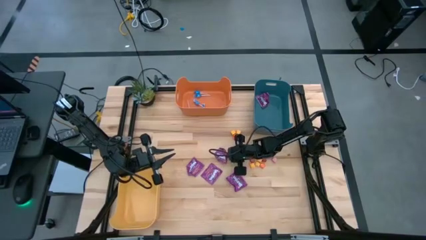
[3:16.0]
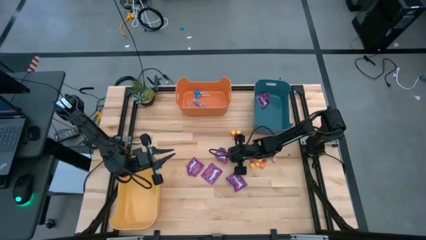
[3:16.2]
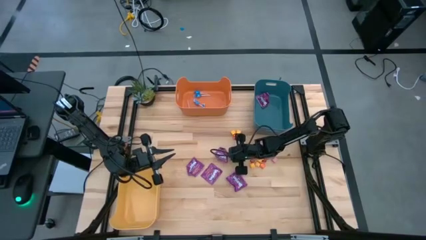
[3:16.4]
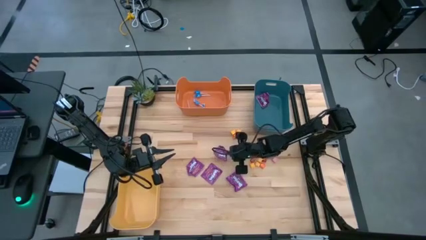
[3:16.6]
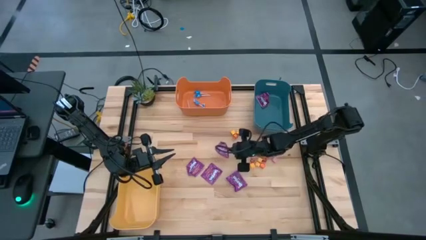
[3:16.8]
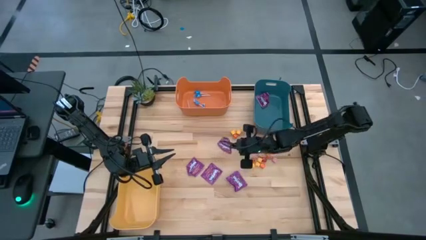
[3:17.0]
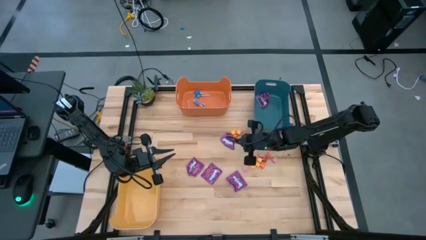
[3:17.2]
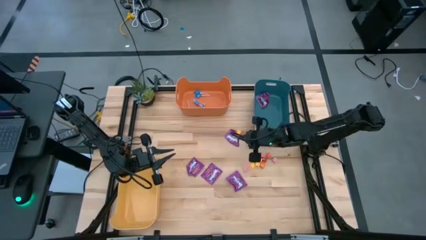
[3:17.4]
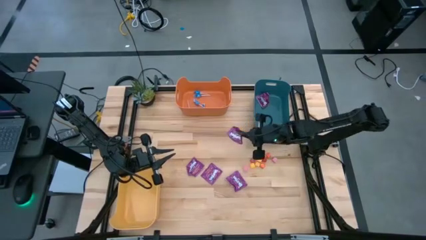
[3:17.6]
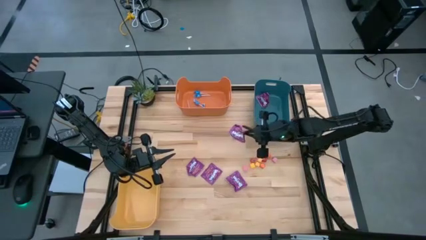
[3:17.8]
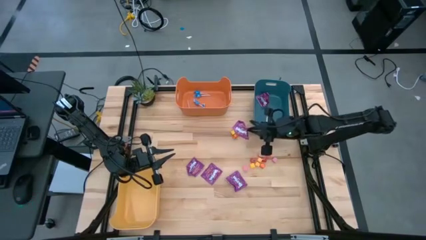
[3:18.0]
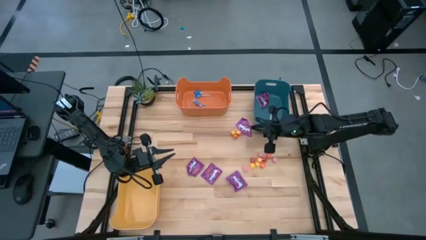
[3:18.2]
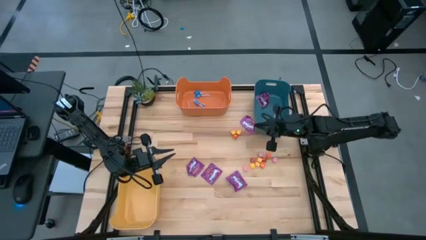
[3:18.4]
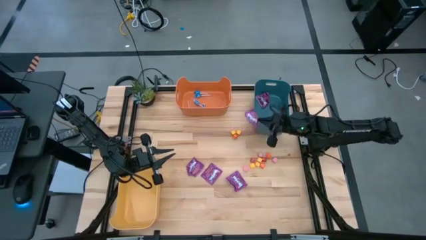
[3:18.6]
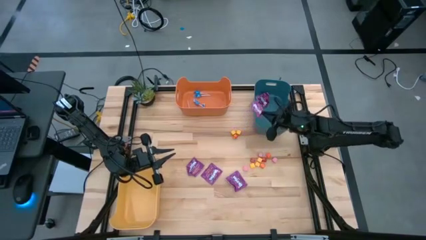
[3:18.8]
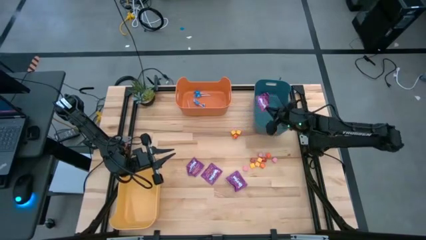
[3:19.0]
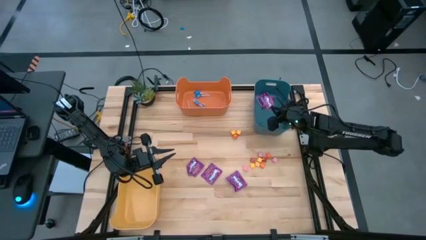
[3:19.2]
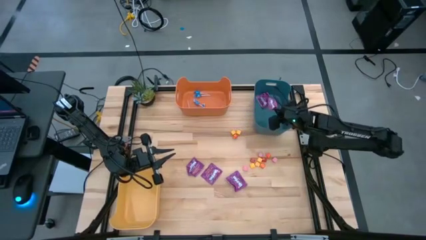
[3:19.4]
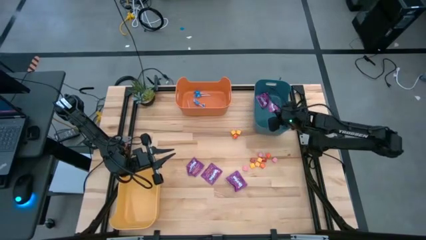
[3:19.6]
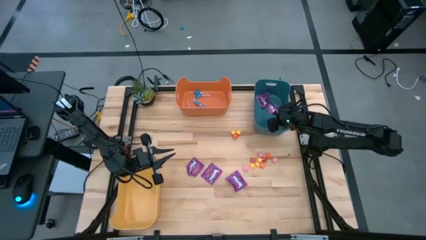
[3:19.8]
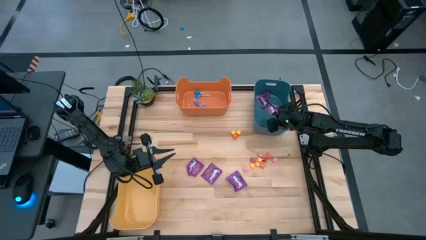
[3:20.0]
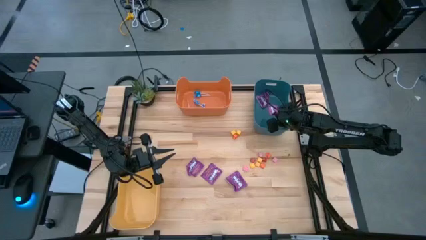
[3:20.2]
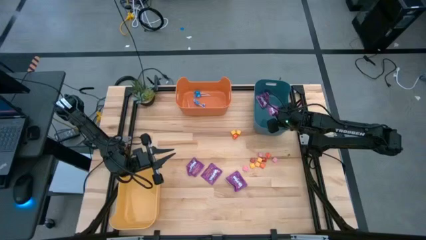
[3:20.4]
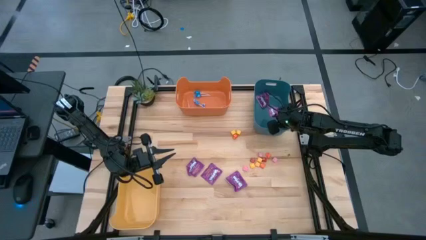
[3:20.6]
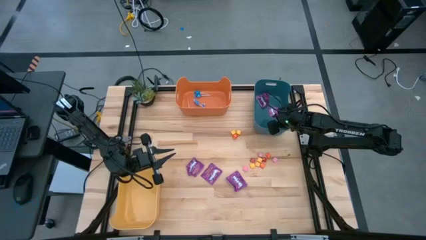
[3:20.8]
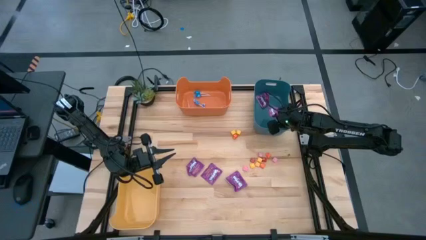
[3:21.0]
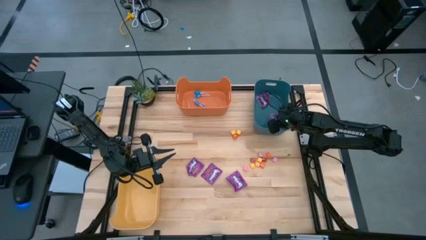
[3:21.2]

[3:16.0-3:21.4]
Task: Sort candy
Put the top purple candy into the blue bin

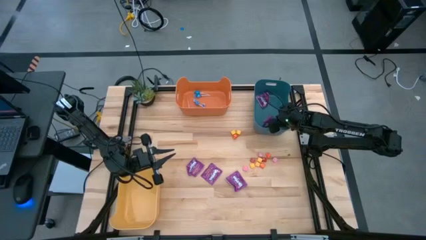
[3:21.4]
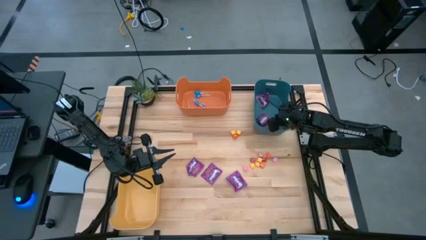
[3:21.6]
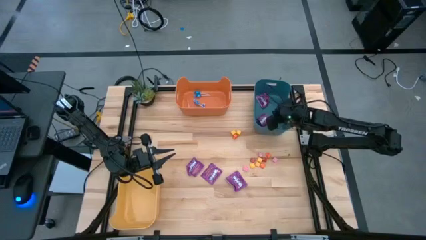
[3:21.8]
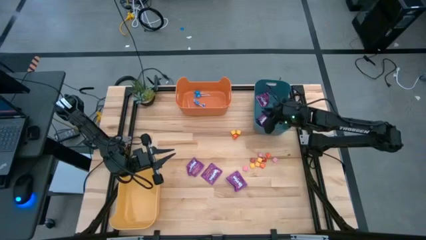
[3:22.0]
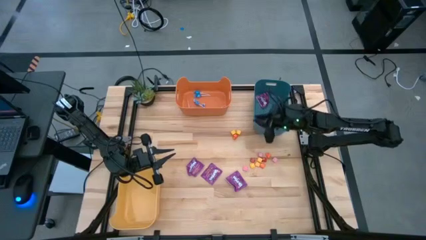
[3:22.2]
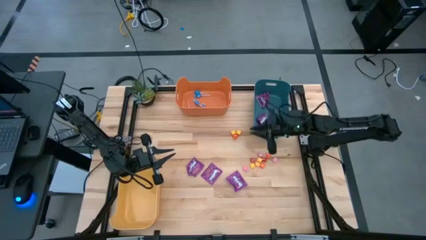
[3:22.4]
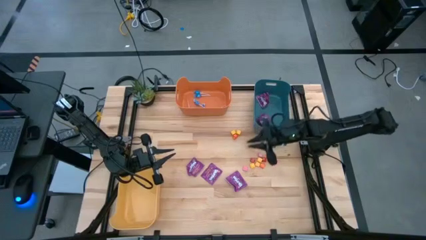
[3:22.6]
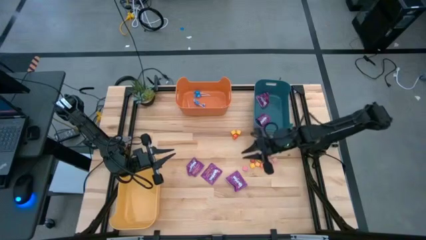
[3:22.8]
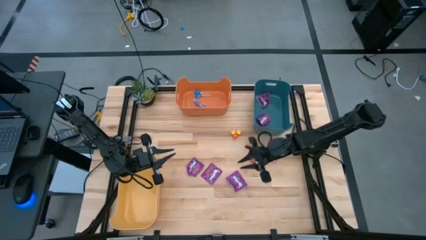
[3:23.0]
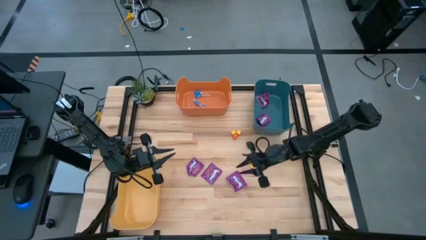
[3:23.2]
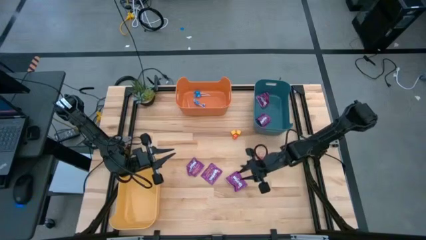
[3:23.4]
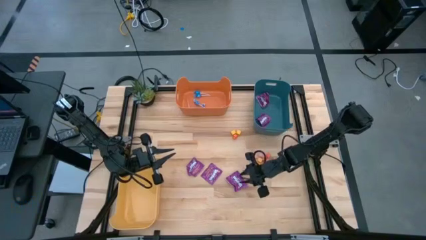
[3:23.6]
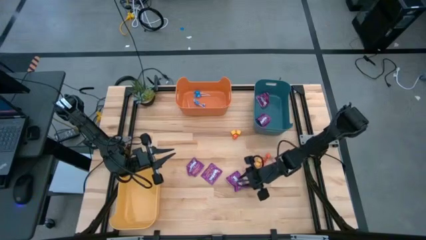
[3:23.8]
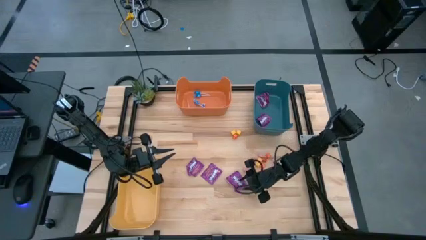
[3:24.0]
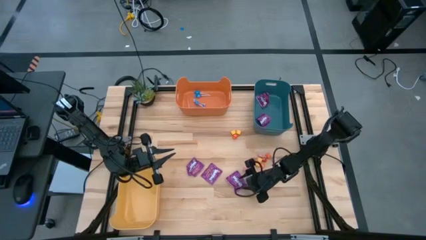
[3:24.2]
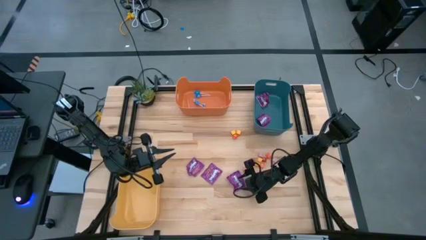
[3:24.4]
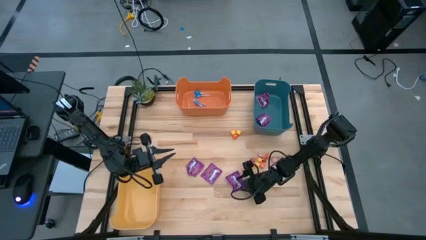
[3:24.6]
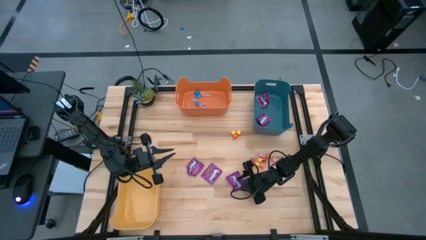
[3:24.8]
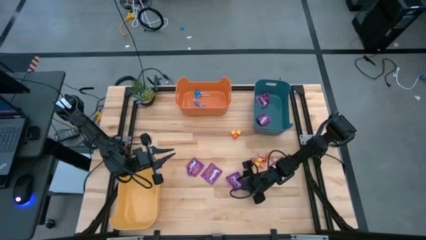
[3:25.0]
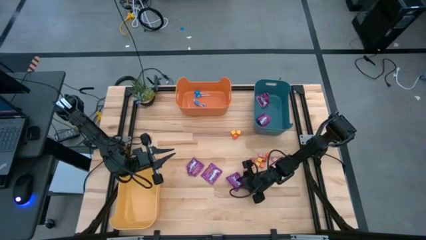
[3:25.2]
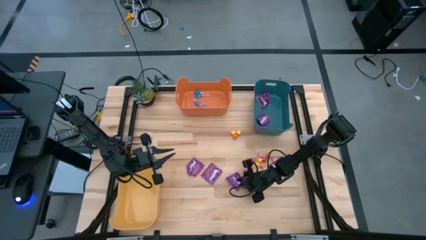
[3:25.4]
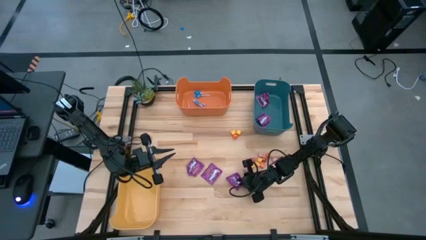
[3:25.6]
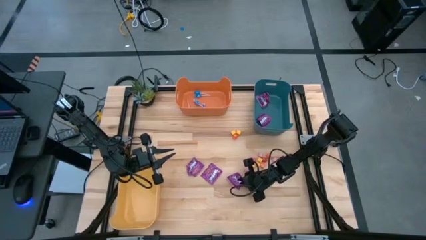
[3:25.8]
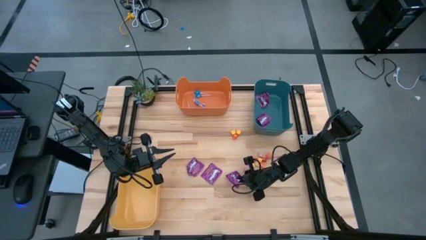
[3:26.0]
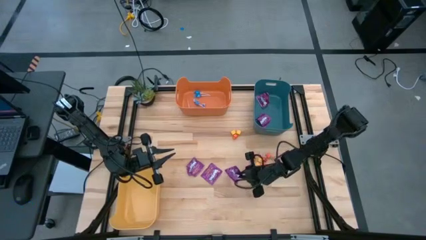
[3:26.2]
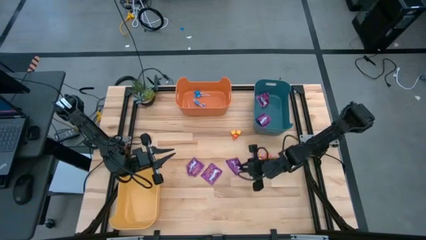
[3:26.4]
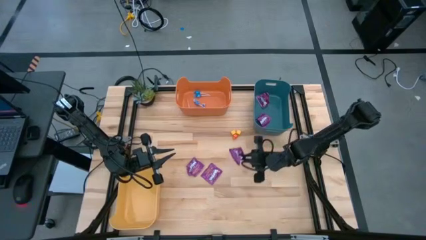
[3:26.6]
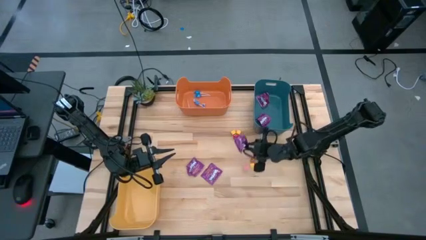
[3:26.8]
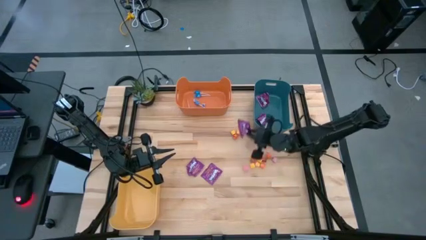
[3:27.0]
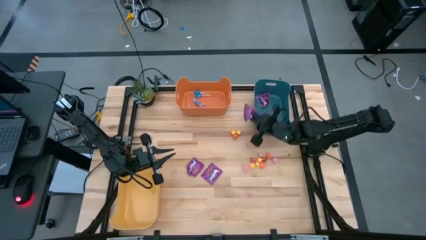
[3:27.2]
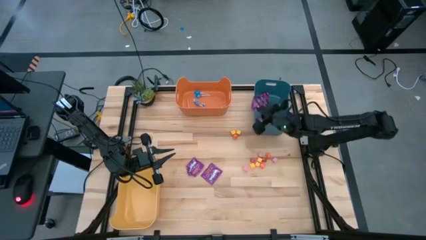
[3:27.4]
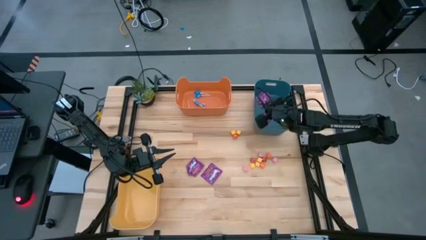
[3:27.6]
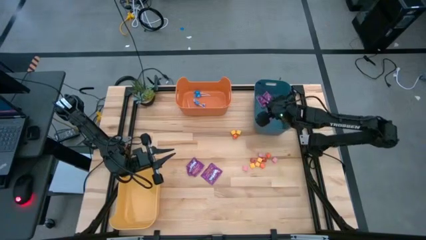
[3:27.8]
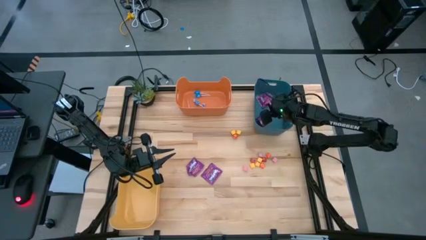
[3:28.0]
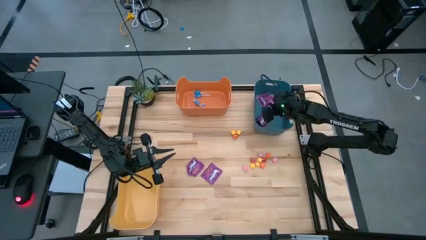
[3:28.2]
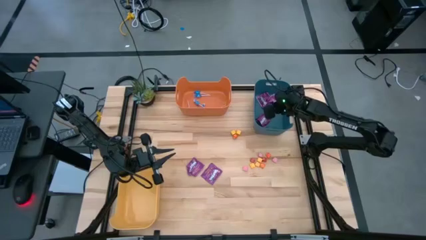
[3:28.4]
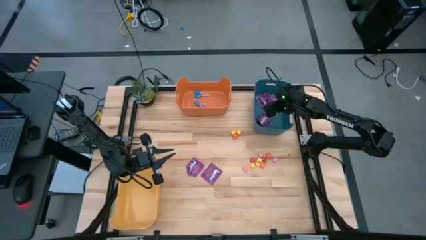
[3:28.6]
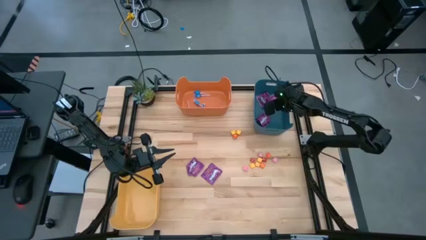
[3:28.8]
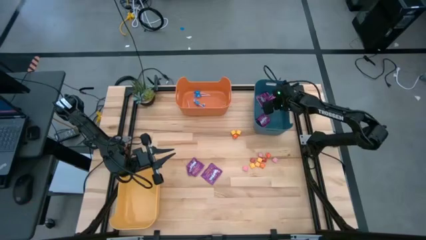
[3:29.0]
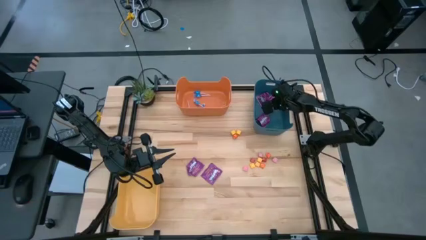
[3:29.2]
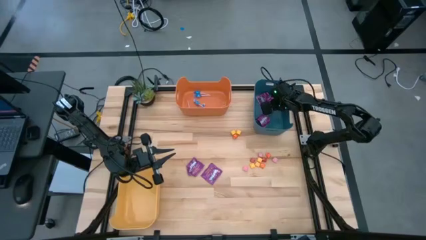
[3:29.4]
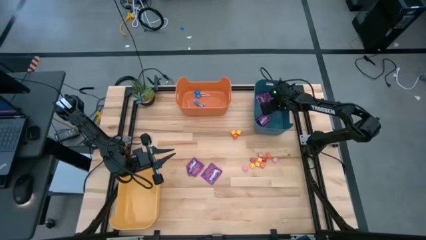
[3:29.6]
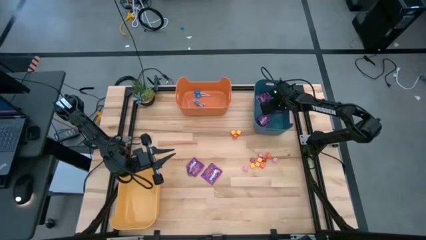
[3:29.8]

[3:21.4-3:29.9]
Put the bottom right purple candy into the blue bin
